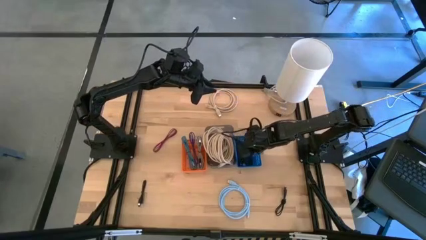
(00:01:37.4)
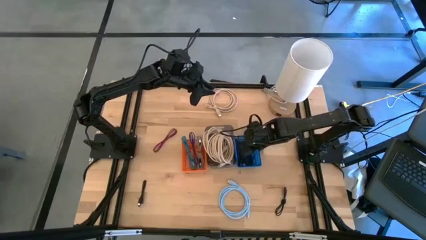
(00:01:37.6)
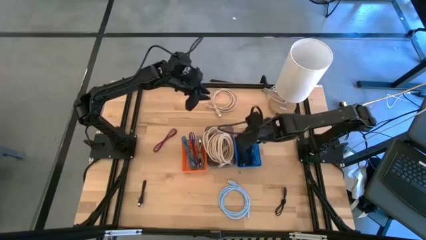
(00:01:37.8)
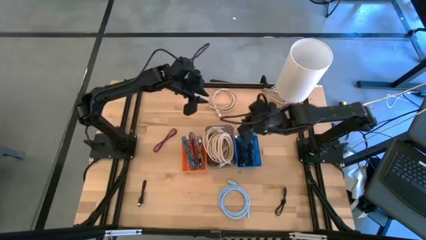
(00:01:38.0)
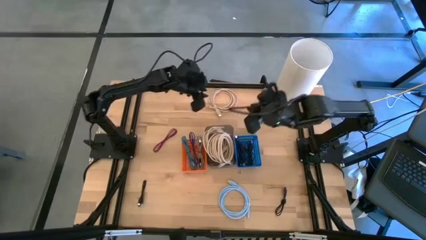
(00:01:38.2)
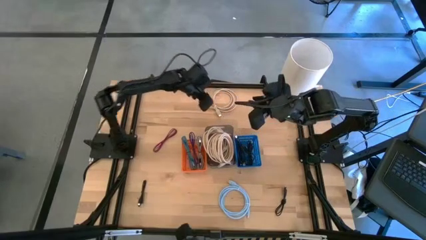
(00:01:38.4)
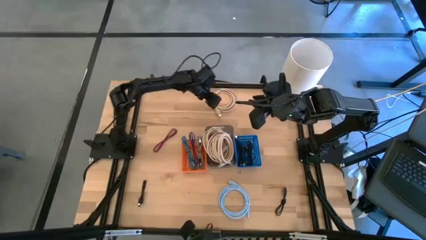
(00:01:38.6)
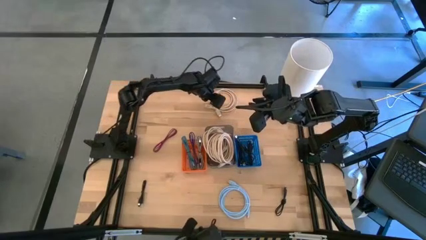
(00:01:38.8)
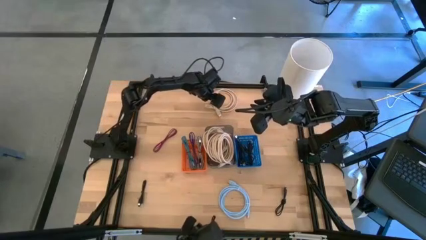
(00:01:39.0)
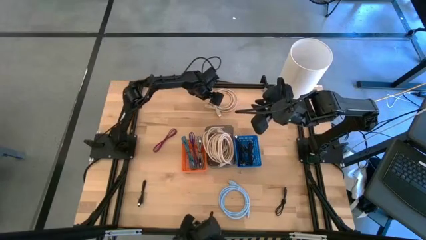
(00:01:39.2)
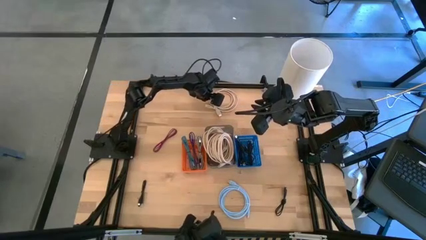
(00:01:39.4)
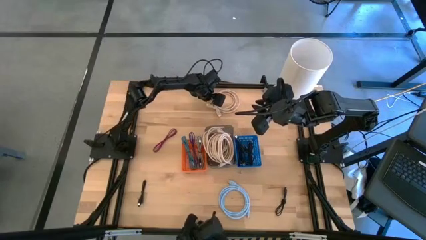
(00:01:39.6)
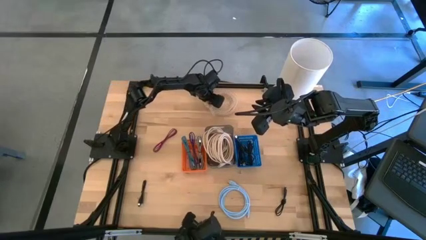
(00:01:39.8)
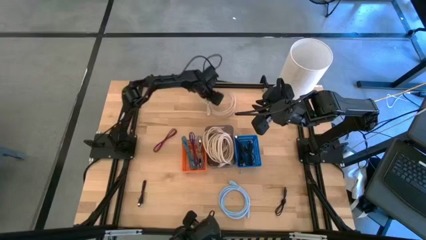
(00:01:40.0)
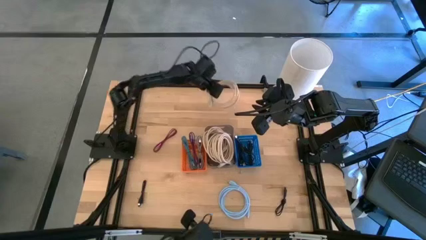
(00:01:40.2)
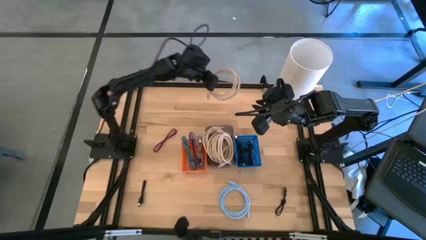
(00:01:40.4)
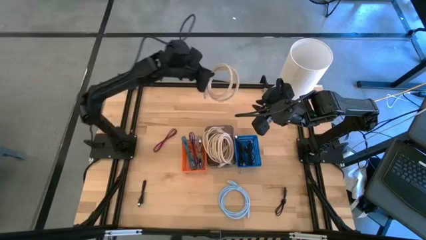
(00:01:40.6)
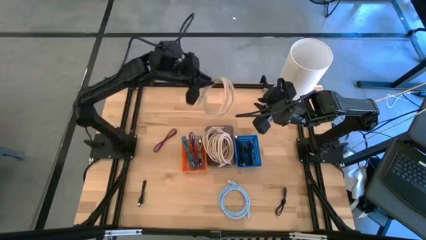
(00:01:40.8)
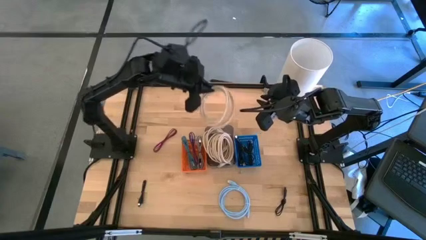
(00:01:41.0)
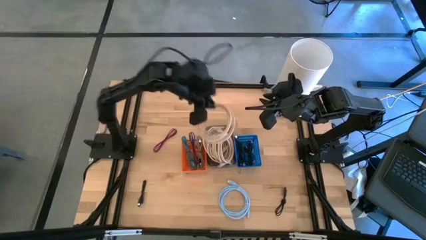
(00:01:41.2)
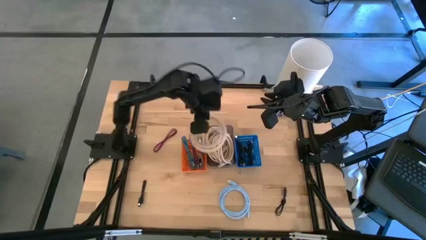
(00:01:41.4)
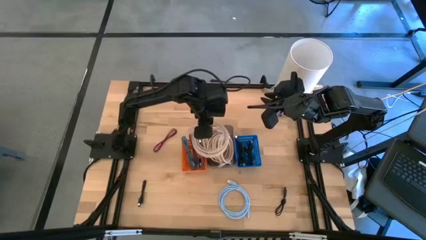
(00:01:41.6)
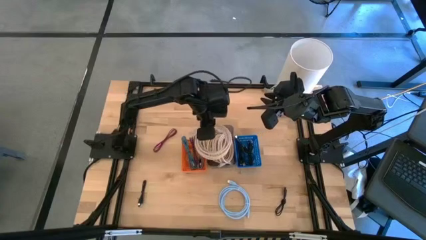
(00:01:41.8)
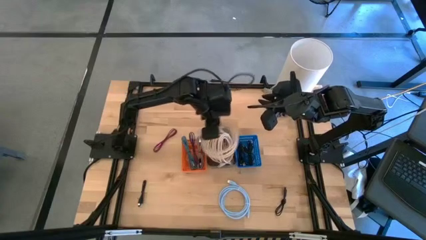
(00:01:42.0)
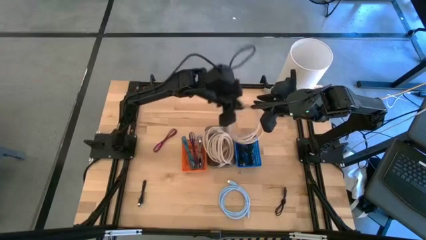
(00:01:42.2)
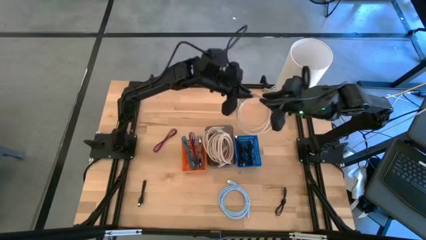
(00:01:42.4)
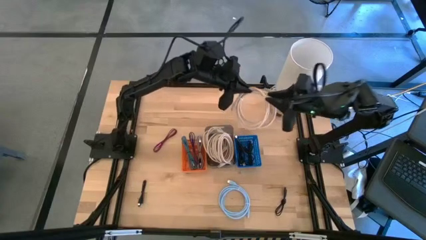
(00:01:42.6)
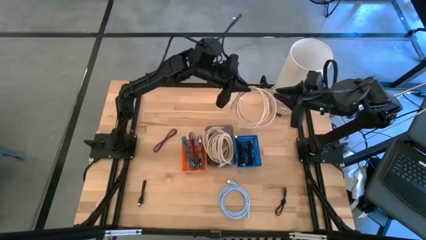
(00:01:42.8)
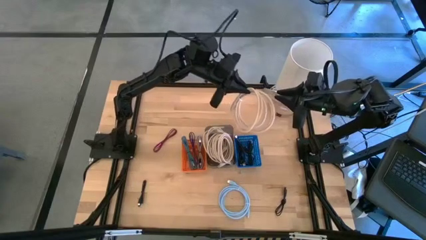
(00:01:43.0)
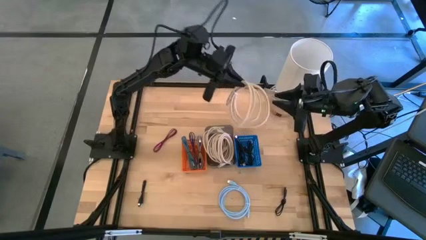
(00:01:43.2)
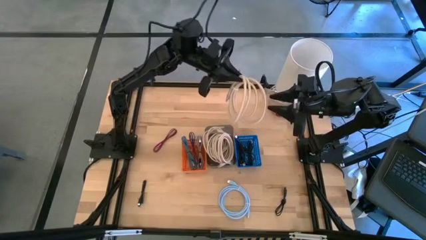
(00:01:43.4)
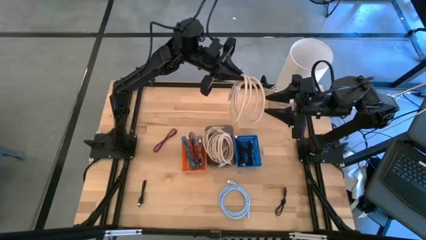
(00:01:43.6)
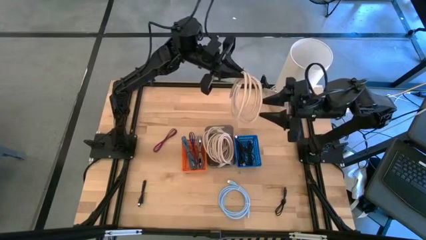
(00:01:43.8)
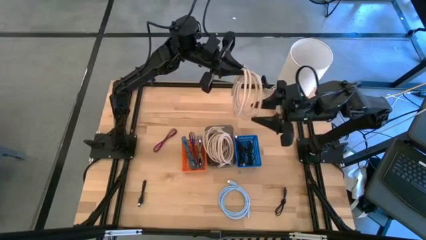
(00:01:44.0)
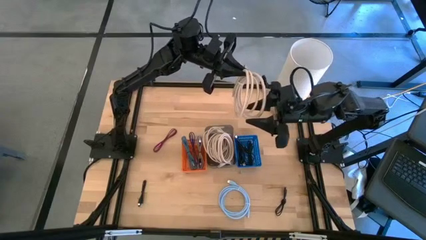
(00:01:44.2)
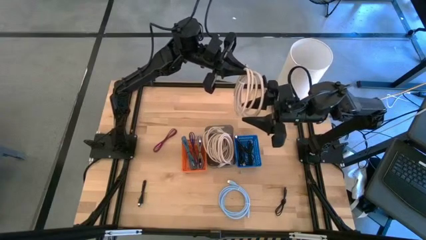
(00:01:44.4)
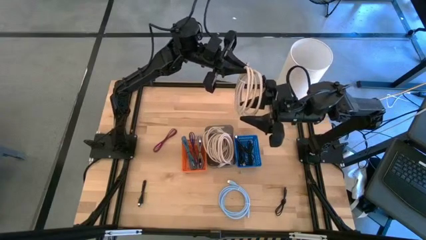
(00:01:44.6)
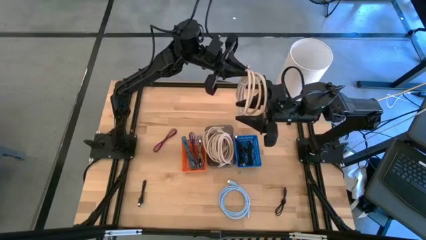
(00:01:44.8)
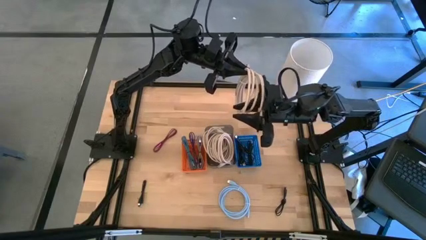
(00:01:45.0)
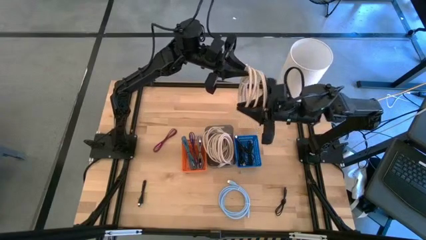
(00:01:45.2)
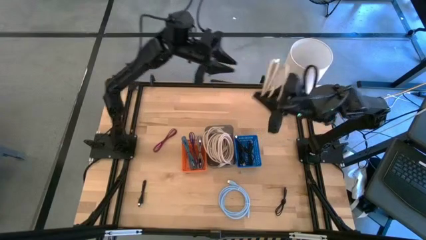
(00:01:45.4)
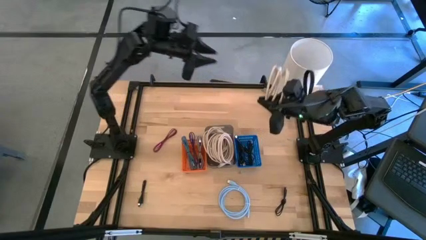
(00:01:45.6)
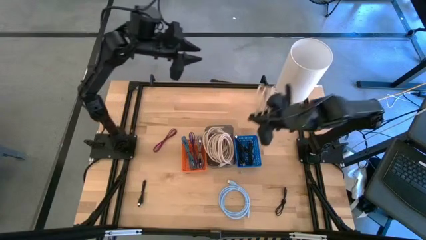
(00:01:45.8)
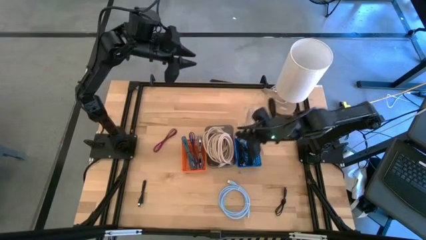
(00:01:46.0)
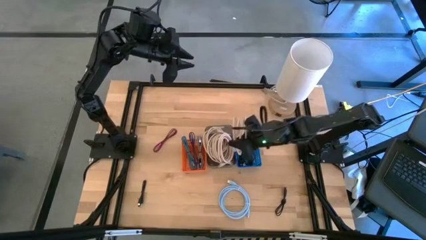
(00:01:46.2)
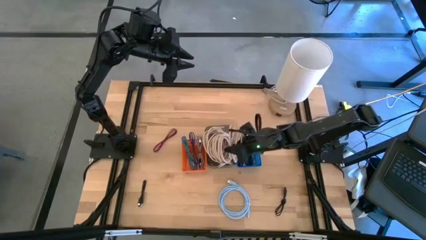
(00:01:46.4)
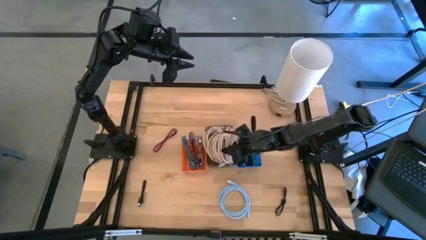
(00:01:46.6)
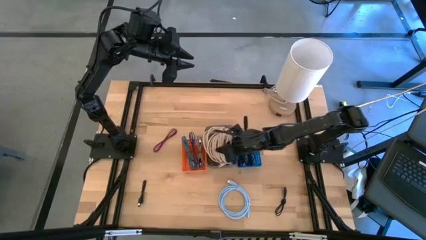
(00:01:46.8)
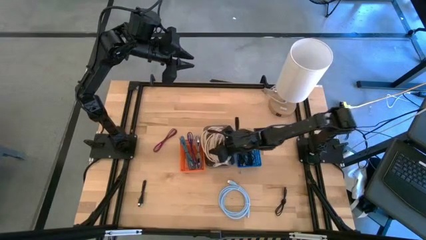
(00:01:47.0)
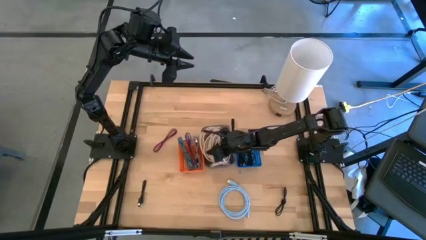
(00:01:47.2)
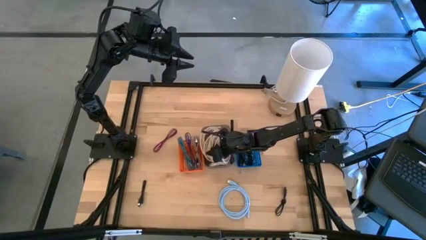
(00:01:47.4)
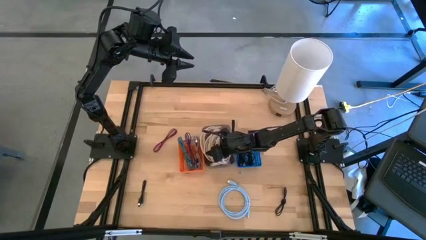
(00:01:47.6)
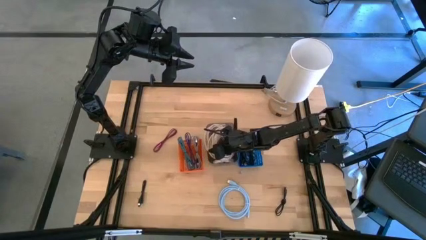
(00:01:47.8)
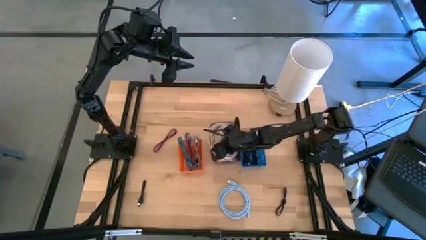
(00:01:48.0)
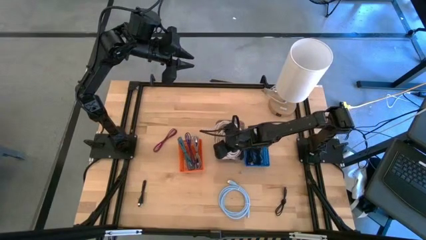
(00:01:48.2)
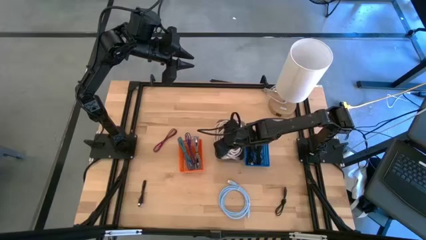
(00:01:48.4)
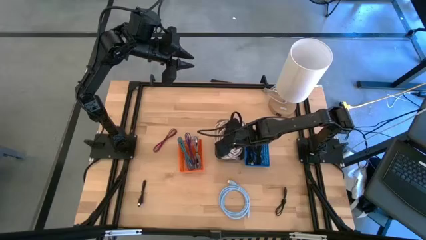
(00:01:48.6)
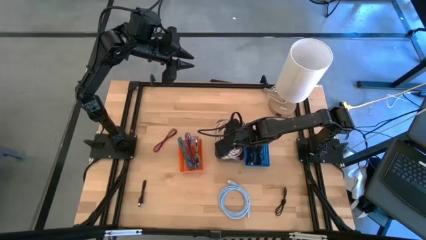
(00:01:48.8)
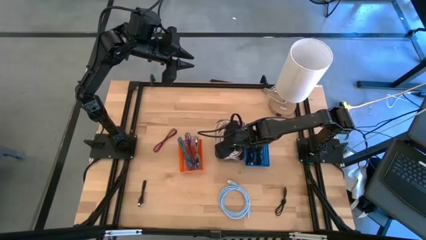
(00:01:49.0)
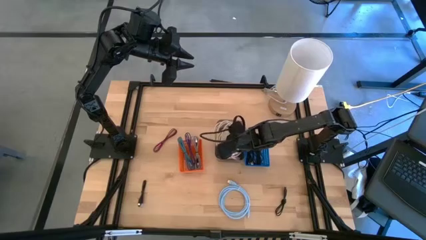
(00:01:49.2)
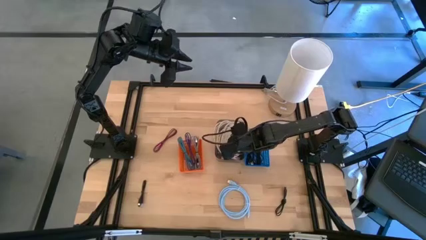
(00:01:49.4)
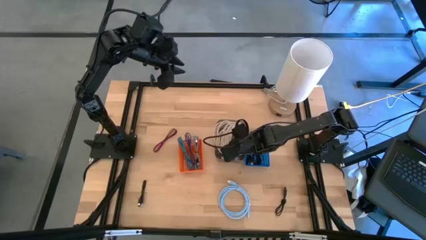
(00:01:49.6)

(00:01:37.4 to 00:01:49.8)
Task: Pick & Place USB Port
Put the light brown HDMI cable into the black bin

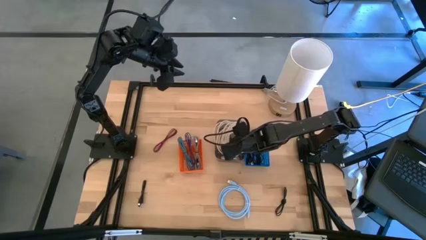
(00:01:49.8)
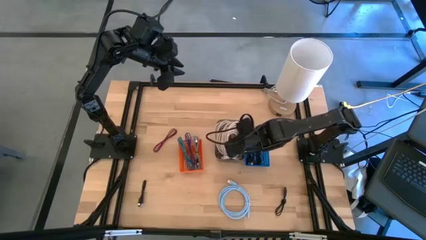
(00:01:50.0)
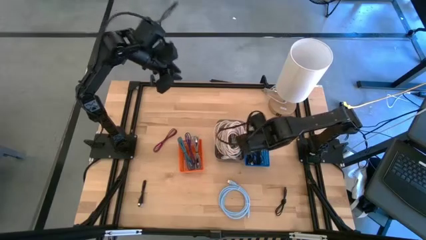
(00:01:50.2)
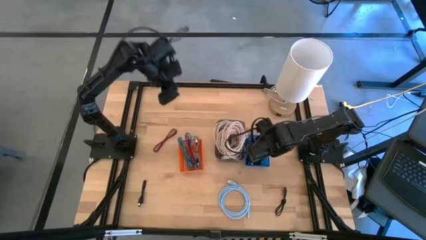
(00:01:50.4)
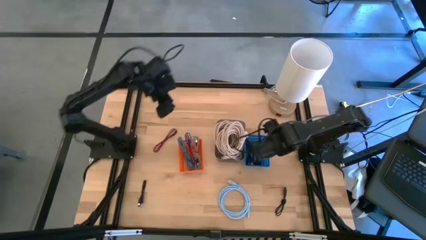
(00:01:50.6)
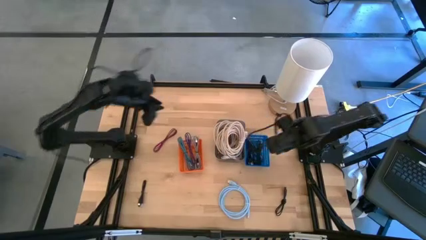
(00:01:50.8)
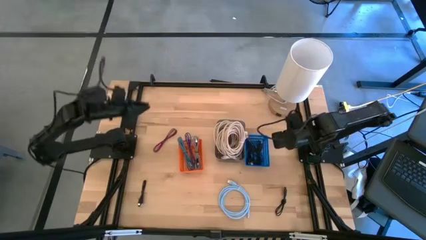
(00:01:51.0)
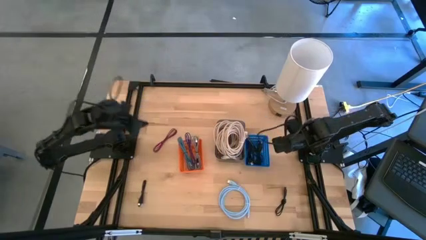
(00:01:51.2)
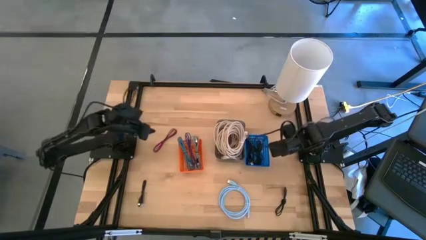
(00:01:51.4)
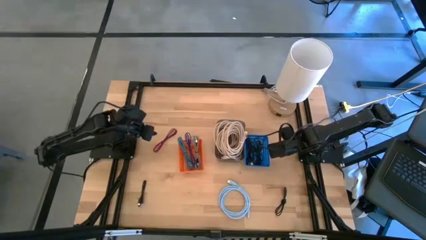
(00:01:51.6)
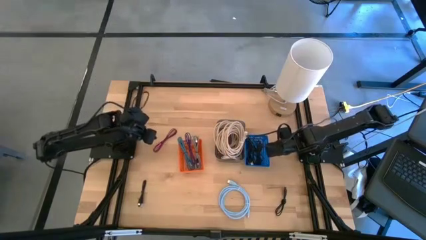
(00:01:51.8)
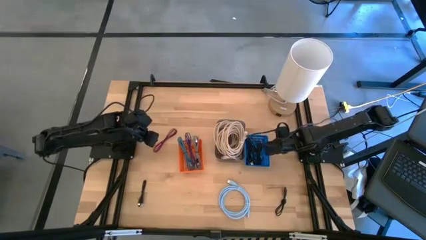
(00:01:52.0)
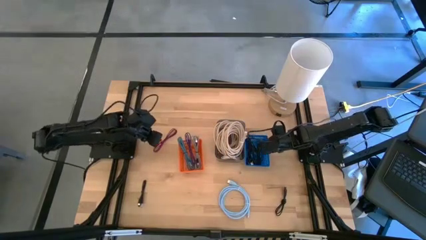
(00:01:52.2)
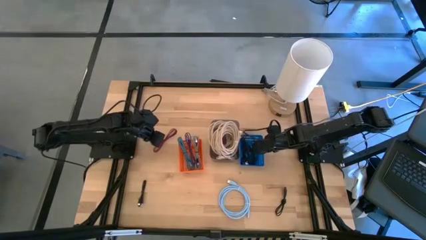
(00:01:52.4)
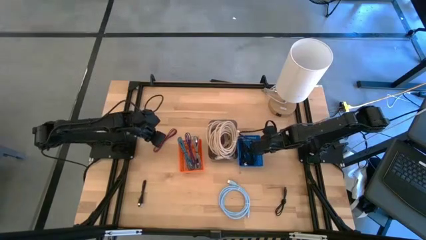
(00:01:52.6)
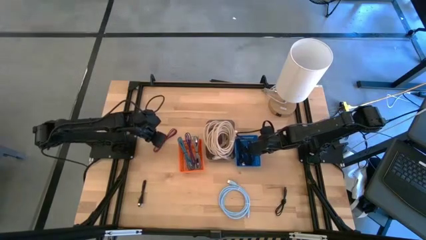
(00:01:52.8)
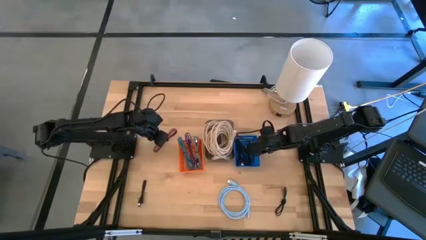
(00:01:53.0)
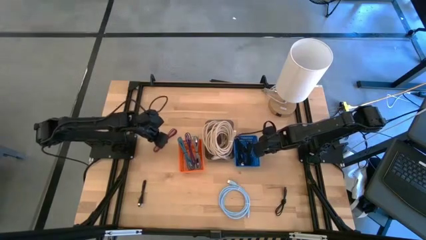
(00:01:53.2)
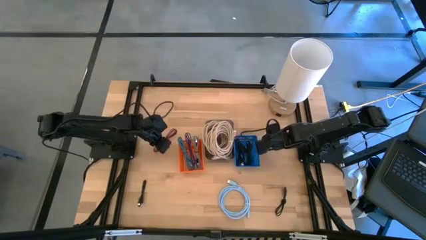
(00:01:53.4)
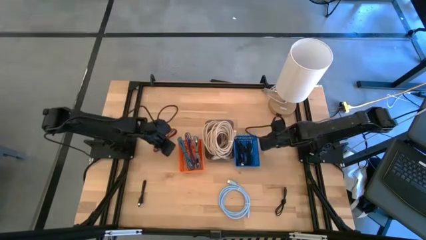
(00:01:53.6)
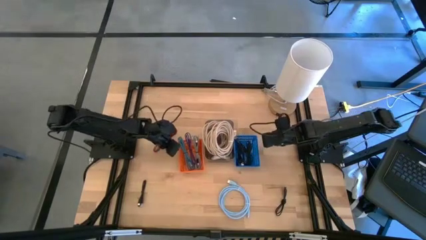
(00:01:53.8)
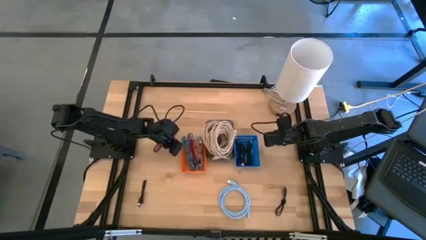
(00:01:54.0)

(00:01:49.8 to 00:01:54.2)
Adjust the bins
